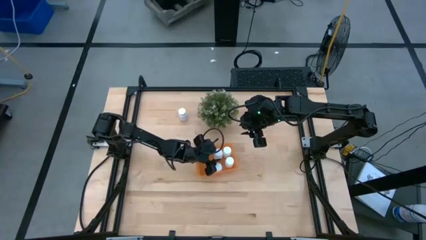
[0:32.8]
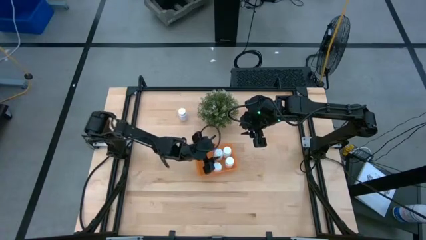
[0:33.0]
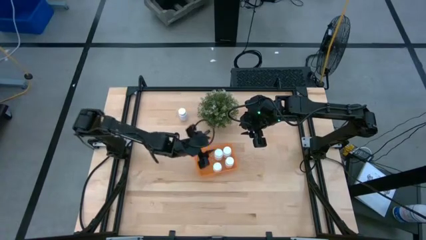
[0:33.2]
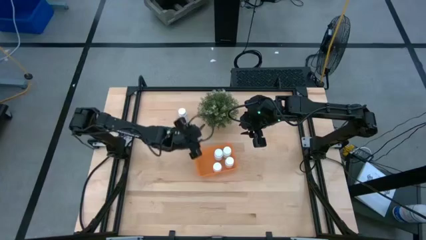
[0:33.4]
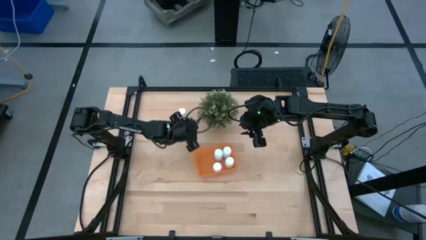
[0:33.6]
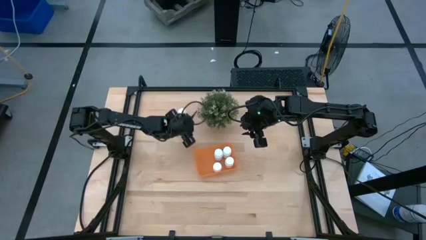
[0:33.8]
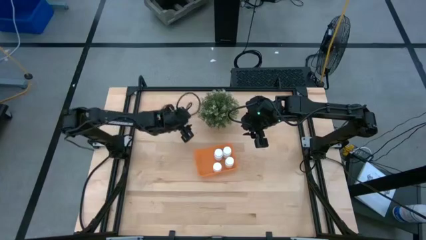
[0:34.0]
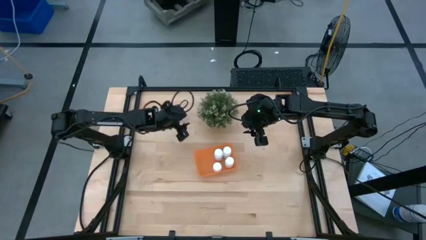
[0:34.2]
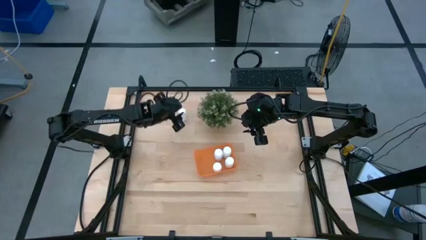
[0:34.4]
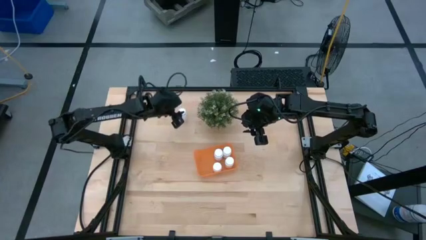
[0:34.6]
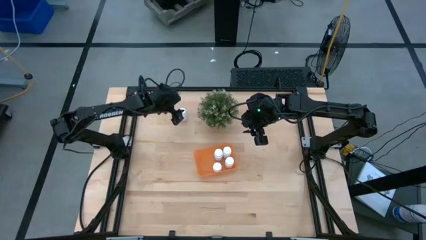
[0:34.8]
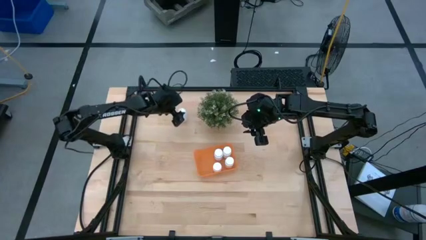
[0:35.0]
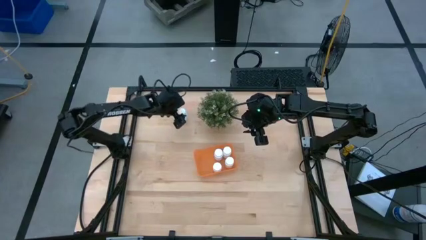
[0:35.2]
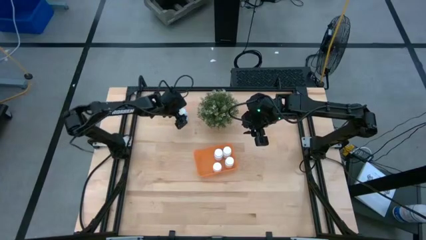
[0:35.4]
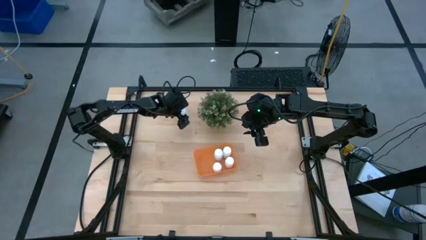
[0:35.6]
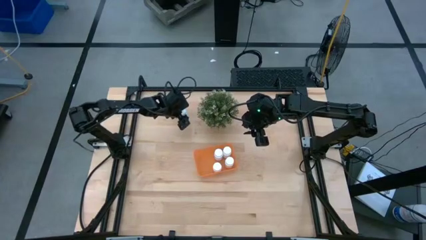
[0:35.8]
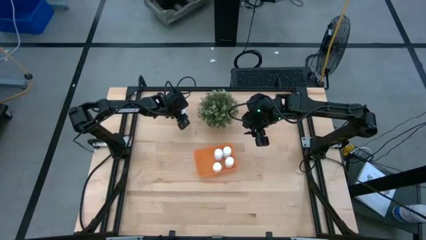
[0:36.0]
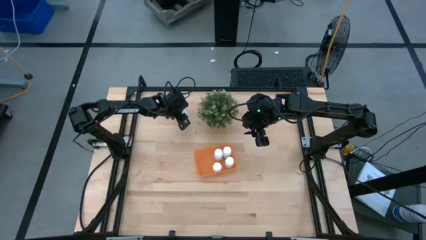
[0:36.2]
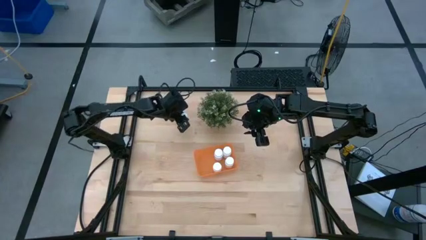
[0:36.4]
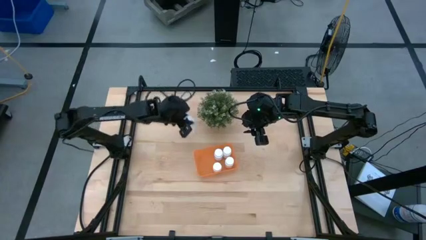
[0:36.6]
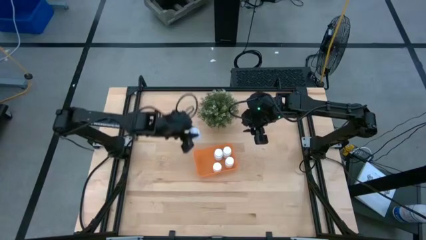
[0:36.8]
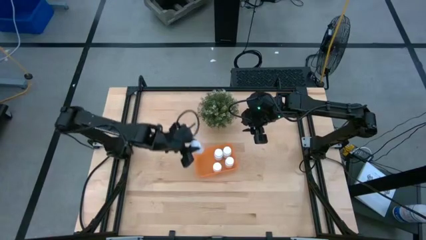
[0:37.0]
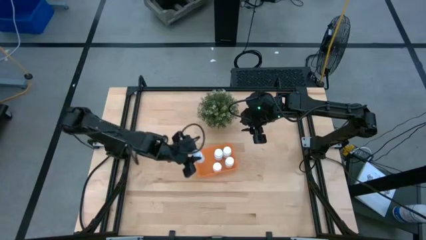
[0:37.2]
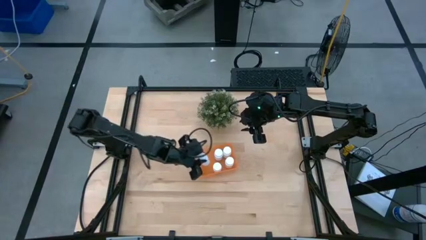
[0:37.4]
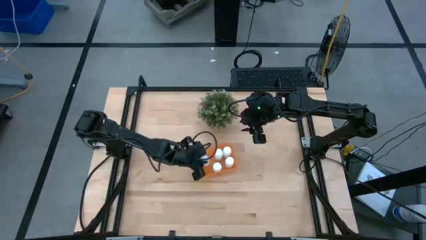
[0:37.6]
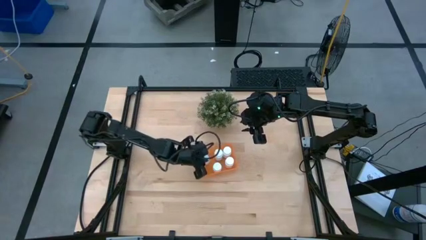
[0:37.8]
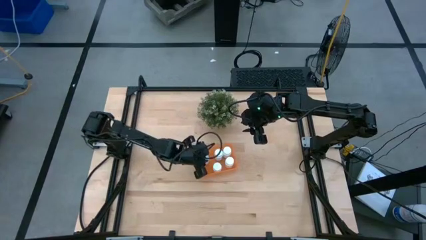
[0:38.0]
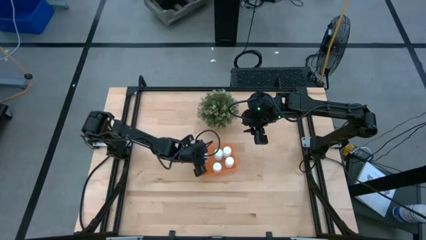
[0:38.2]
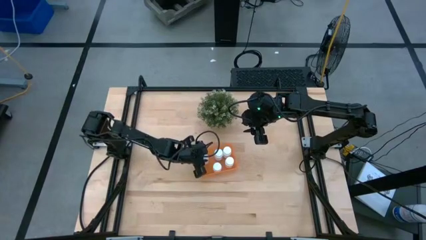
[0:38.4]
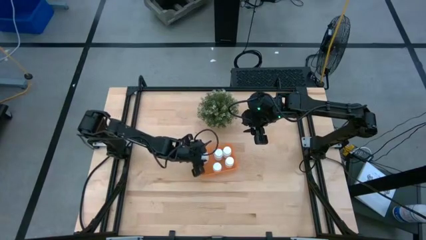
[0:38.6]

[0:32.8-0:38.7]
Task: Pick and place pill bottles into a basket
Put the white pill bottle into the orange bin

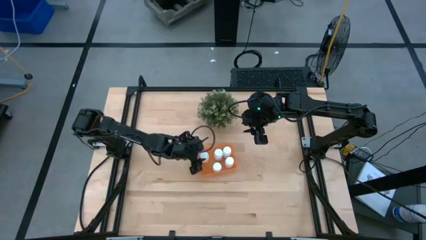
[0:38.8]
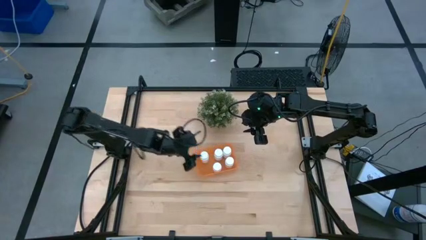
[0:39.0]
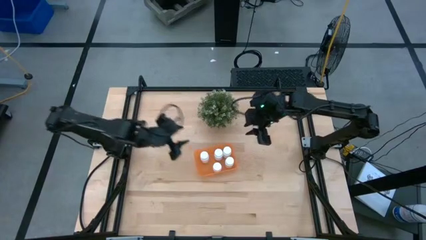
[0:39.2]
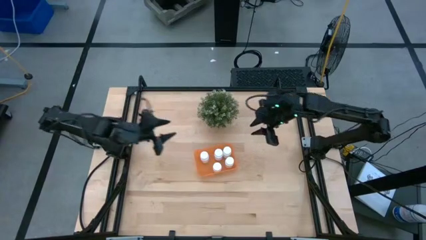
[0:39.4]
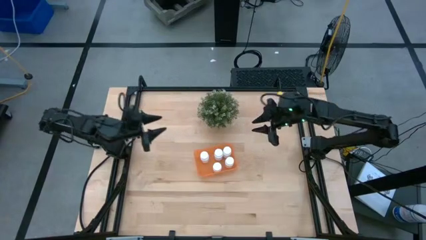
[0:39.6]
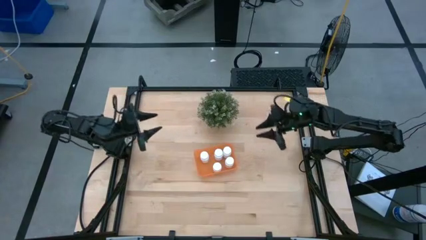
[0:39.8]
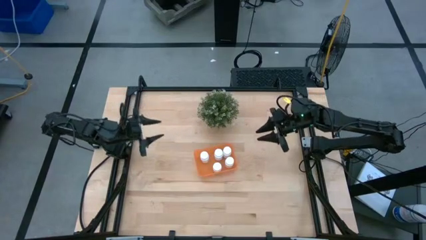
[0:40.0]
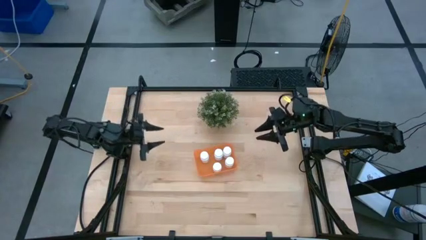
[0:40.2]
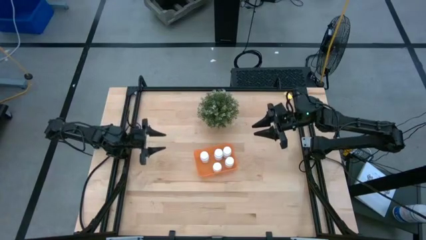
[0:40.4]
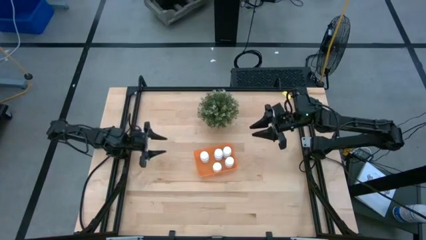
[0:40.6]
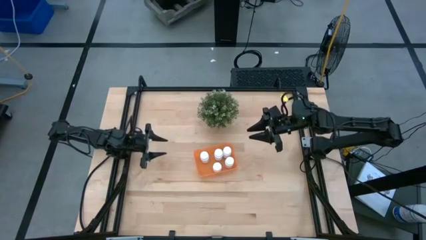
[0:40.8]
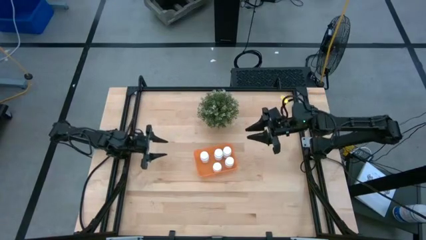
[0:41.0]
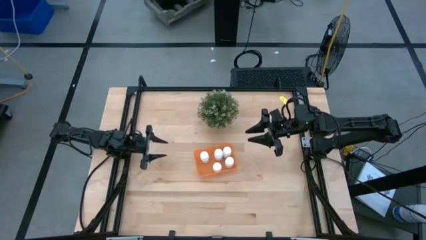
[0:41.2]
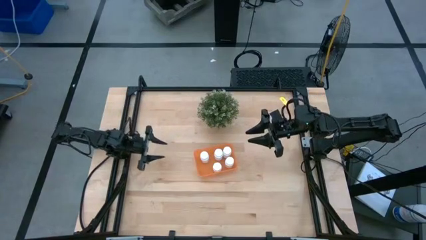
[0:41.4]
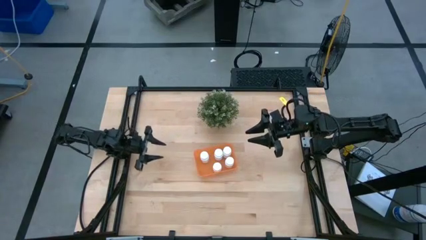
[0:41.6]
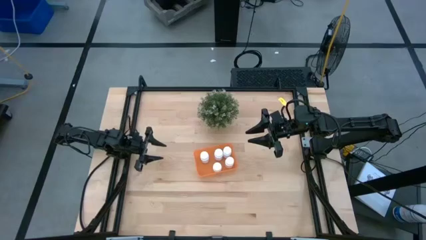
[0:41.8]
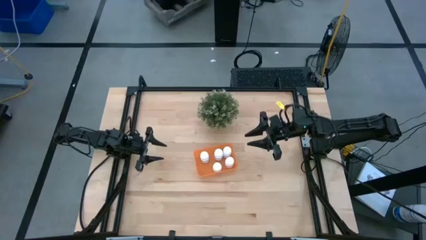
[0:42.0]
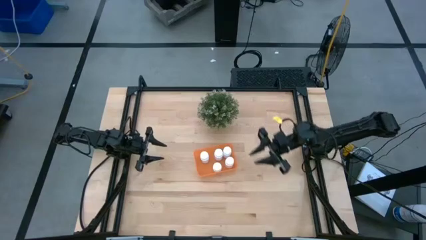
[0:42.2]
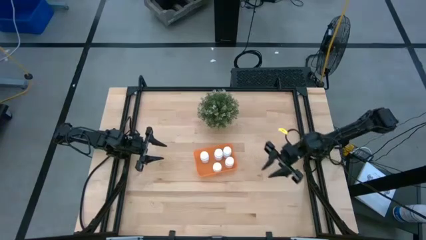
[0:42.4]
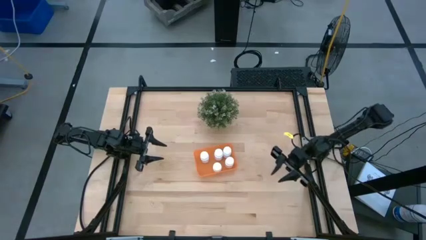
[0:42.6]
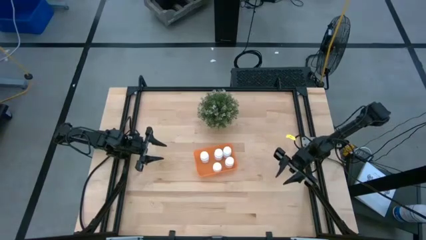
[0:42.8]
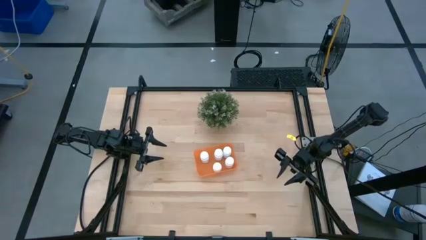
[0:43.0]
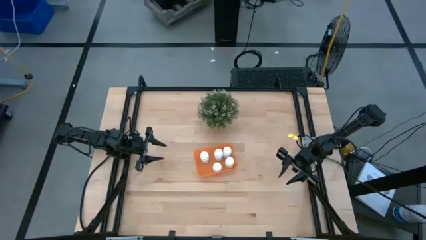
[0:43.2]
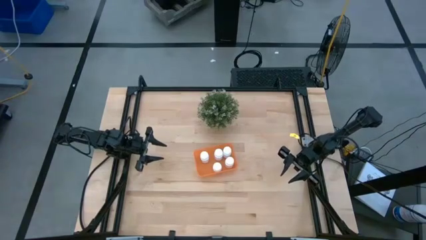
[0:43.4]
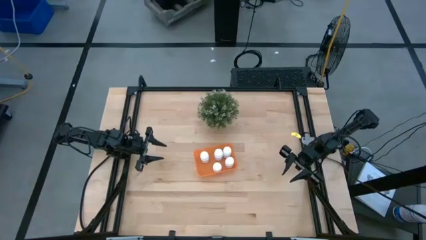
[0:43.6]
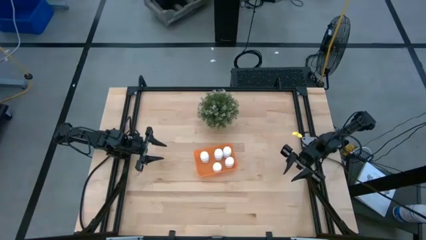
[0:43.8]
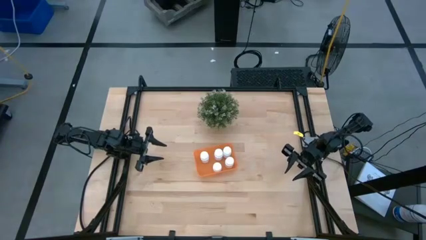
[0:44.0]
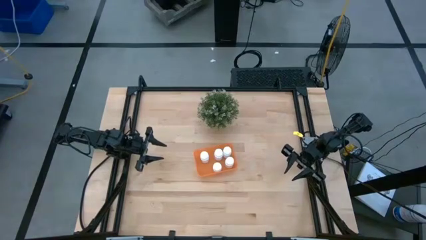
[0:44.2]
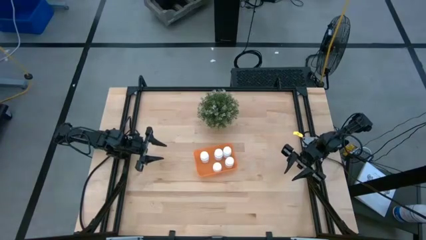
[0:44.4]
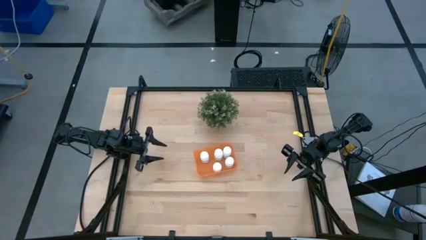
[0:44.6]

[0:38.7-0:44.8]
Return to Home Position

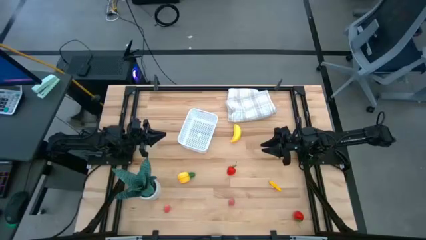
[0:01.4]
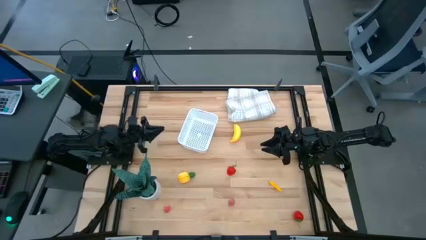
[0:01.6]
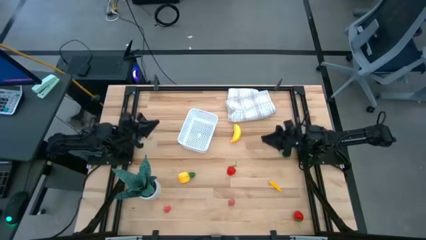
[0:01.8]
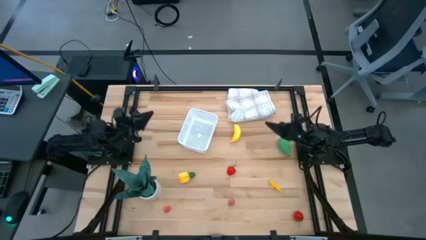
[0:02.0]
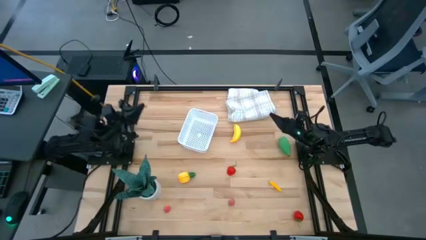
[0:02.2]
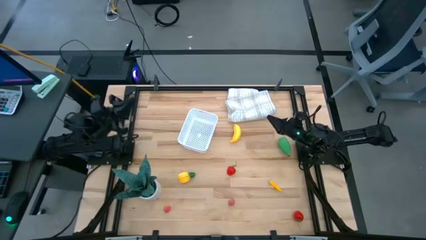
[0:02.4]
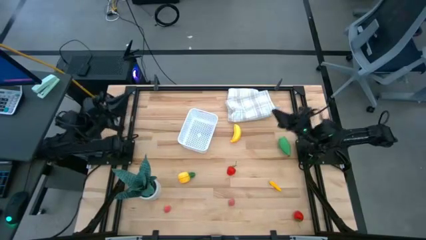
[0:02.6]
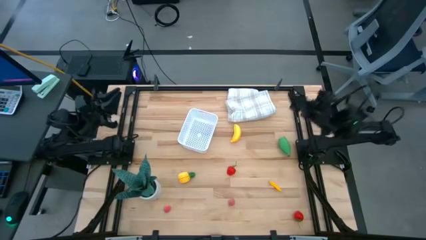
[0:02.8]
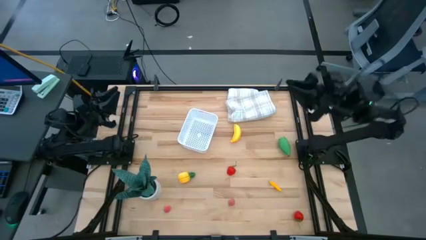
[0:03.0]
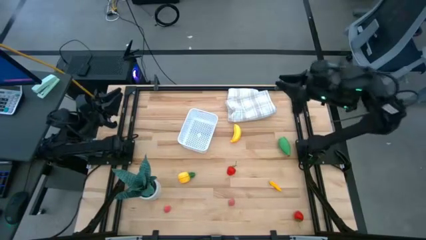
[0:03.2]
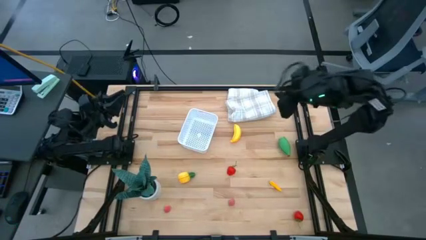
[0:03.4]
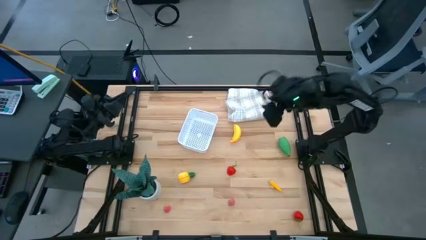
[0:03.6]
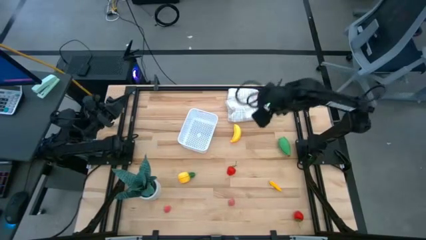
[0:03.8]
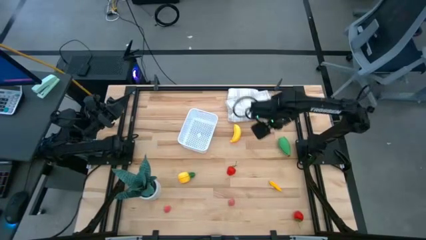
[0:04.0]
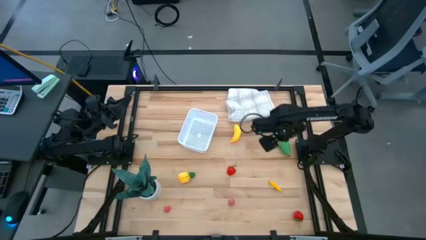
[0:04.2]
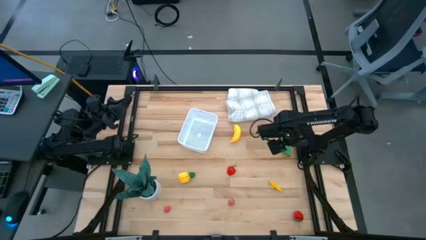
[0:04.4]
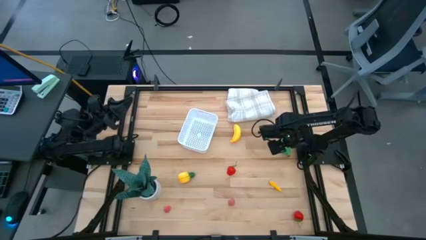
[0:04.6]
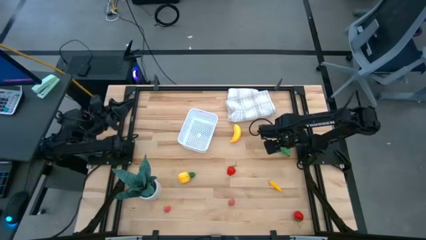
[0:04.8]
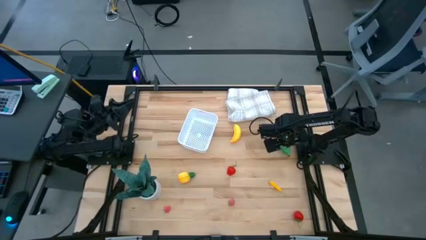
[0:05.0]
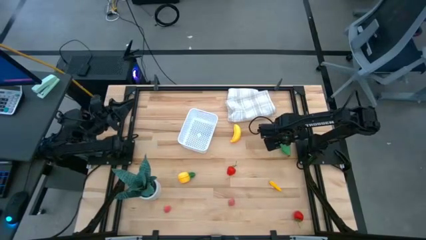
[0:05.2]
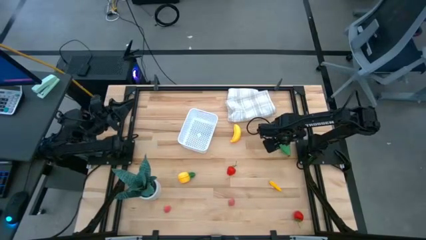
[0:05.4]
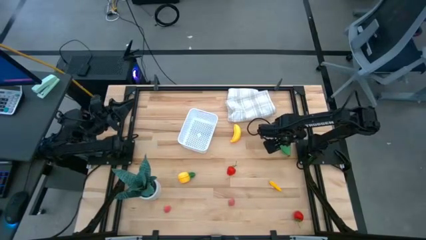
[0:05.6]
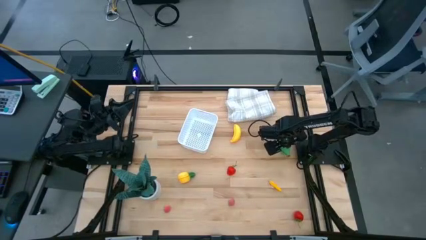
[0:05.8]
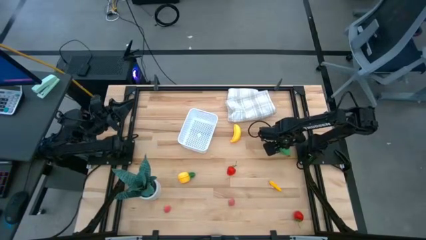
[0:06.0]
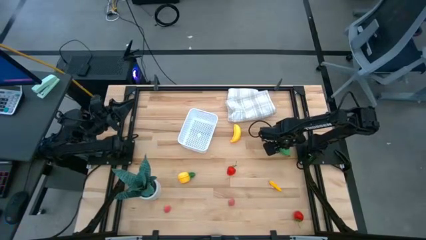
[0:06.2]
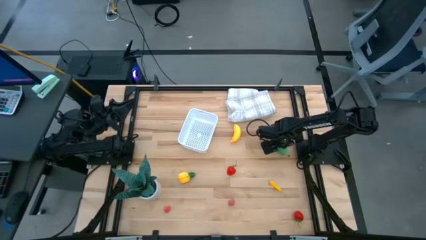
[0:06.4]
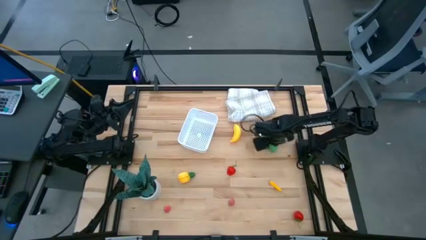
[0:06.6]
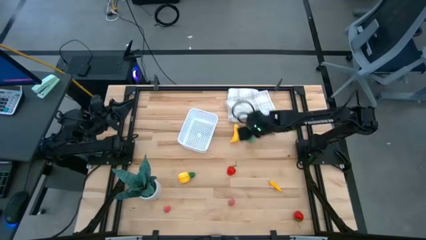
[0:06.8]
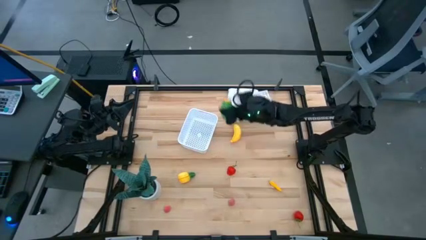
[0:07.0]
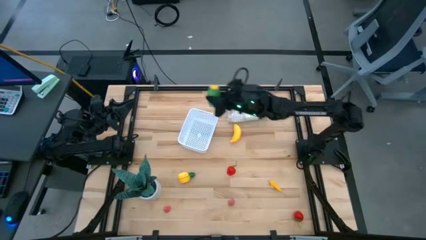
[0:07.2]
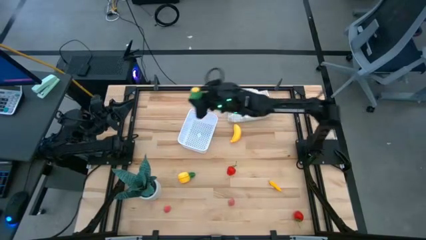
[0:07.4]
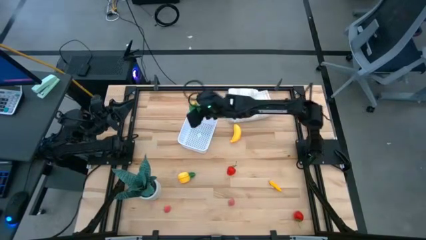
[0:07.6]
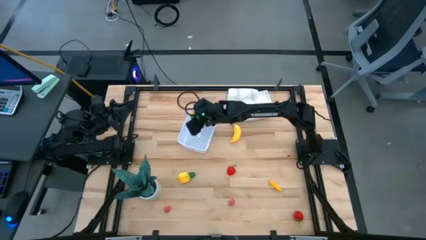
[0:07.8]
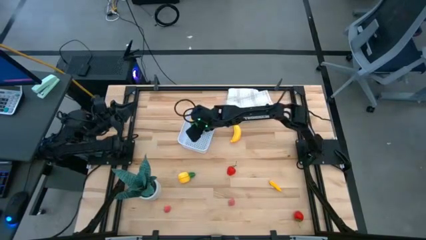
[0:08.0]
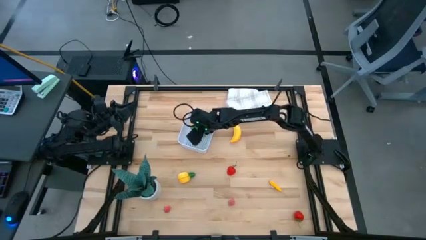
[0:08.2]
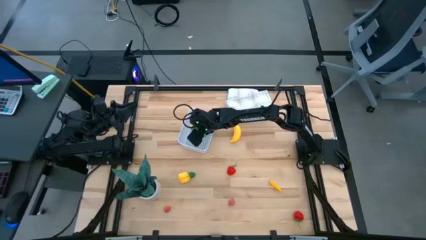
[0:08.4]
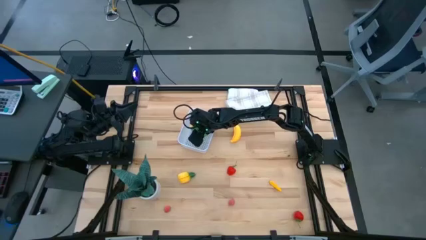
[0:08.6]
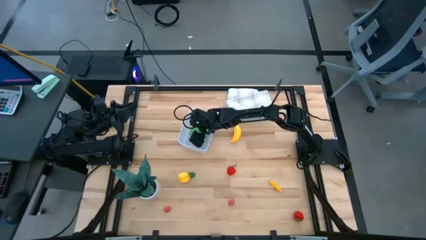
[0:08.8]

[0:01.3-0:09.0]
Task: Pick and placing Produce into tupperware
Put the green corn into the basket
